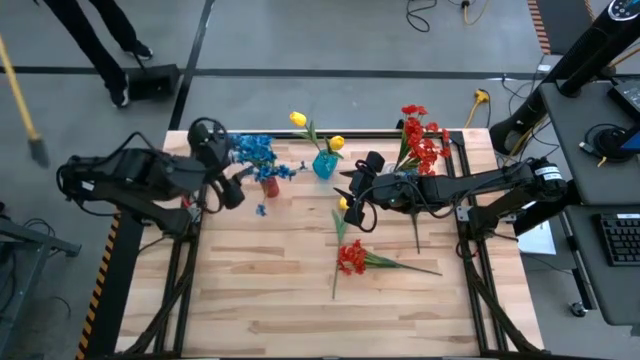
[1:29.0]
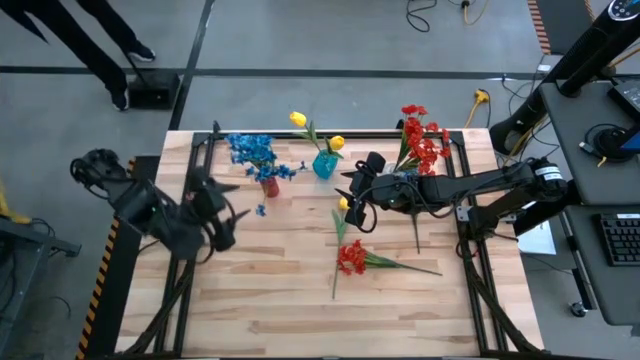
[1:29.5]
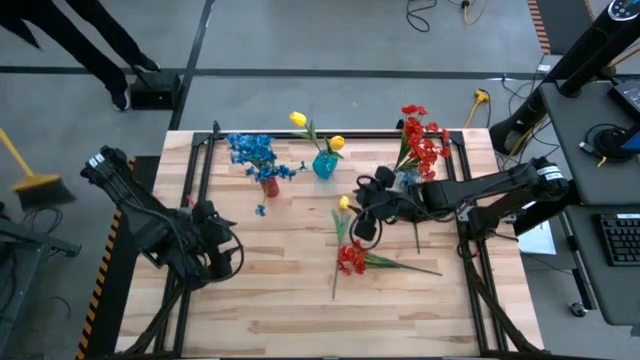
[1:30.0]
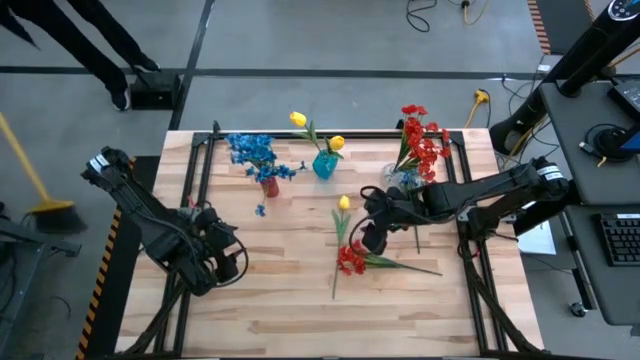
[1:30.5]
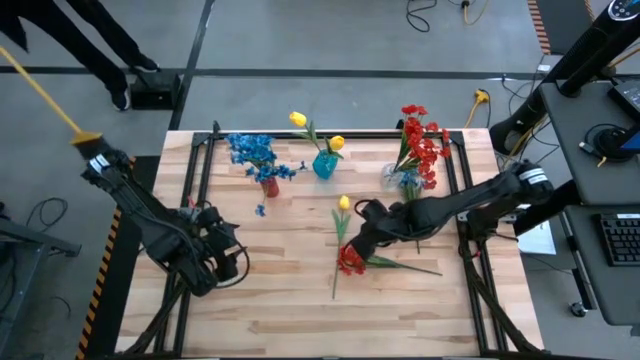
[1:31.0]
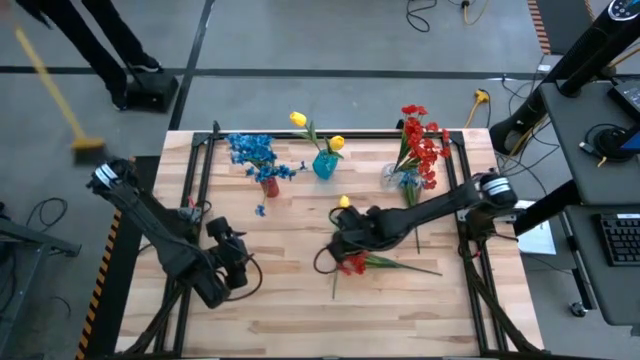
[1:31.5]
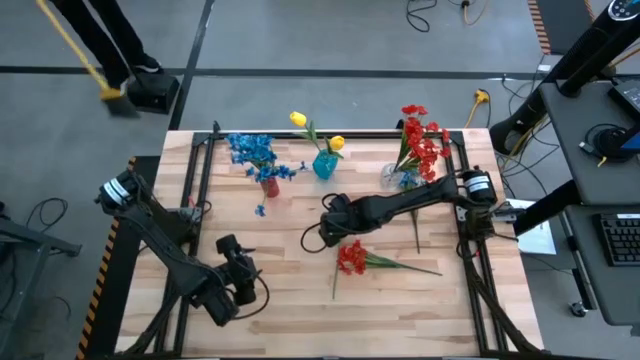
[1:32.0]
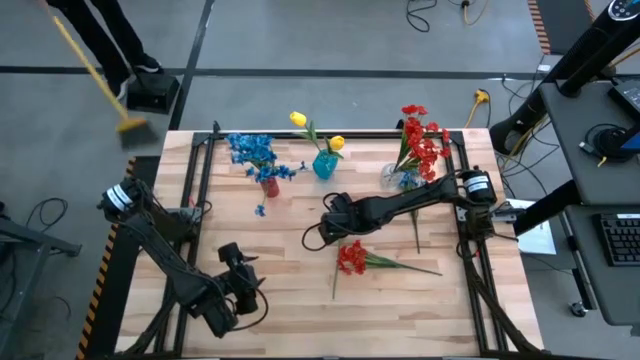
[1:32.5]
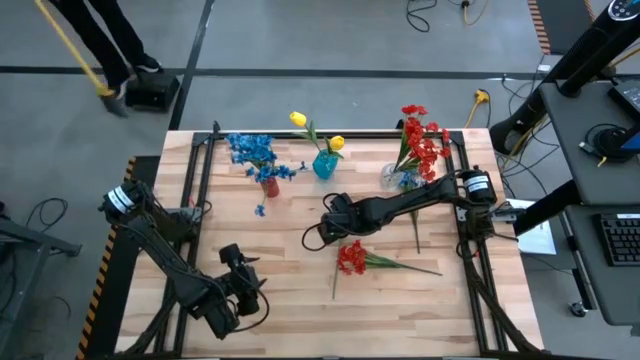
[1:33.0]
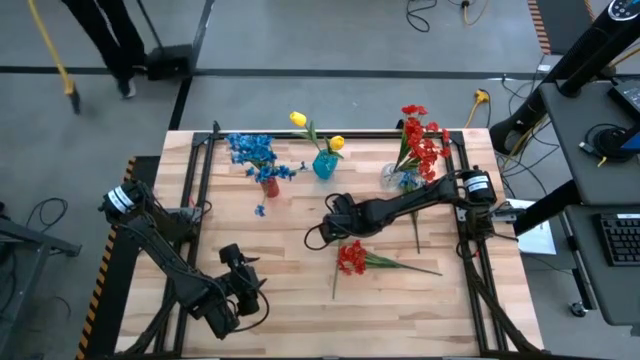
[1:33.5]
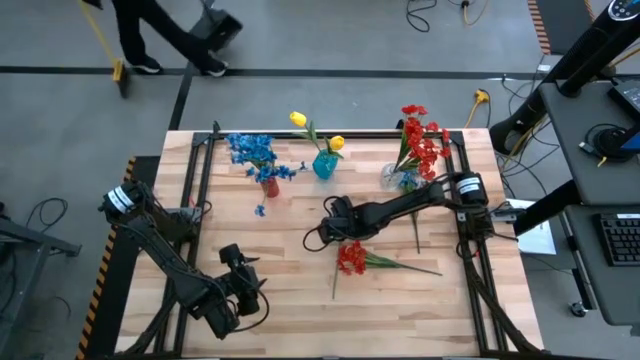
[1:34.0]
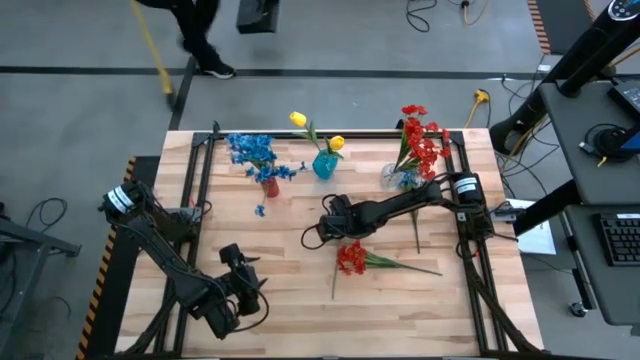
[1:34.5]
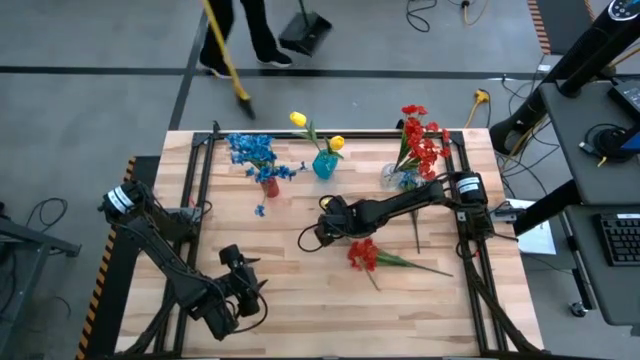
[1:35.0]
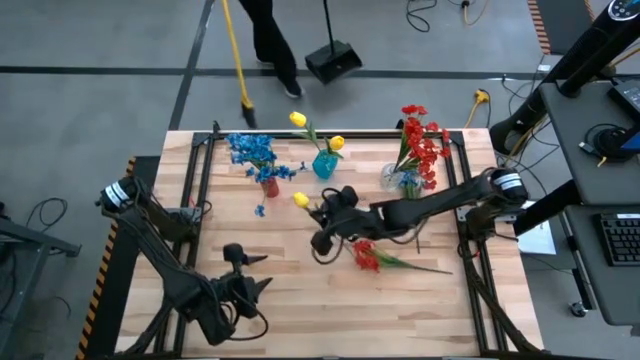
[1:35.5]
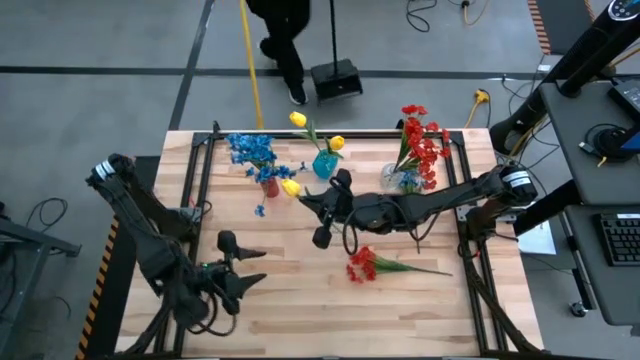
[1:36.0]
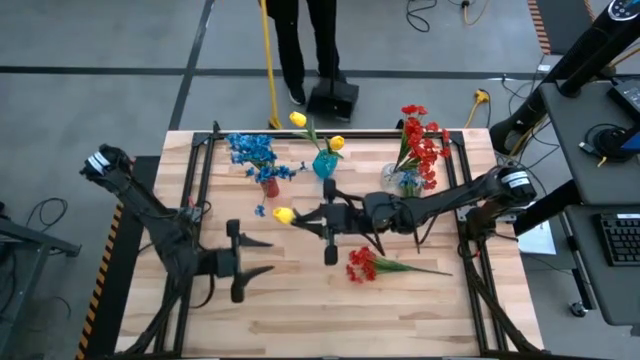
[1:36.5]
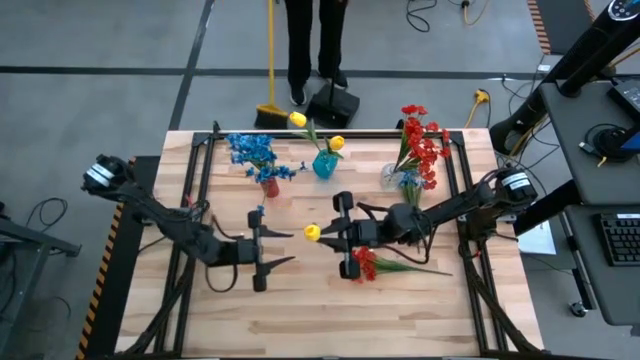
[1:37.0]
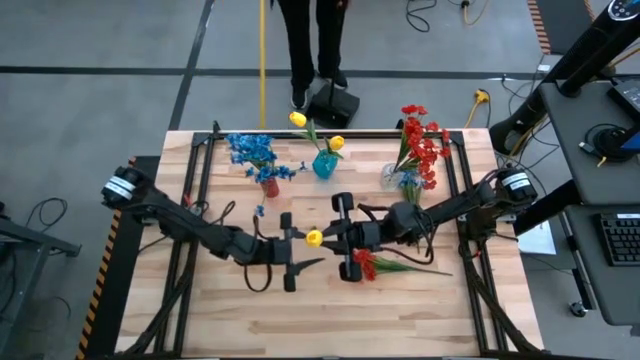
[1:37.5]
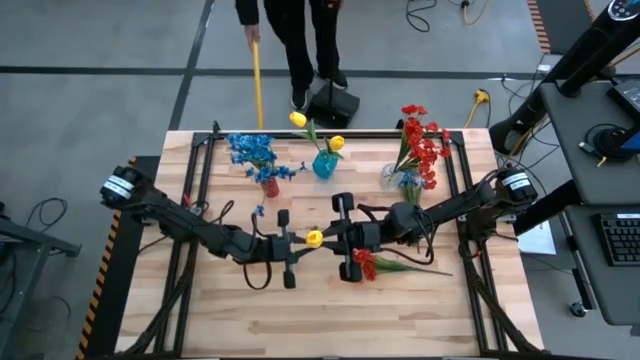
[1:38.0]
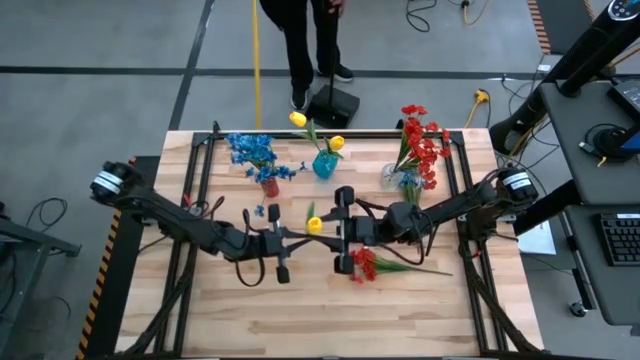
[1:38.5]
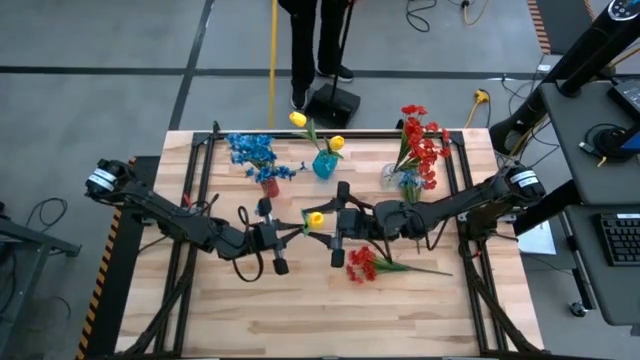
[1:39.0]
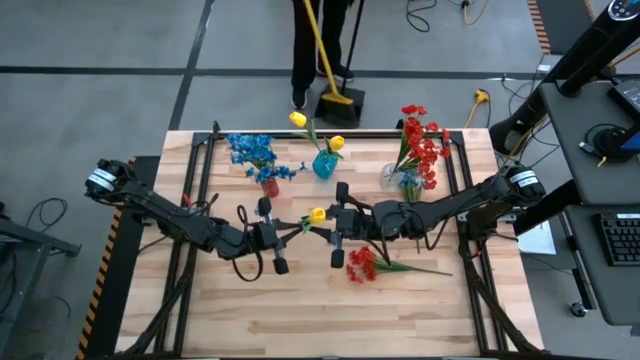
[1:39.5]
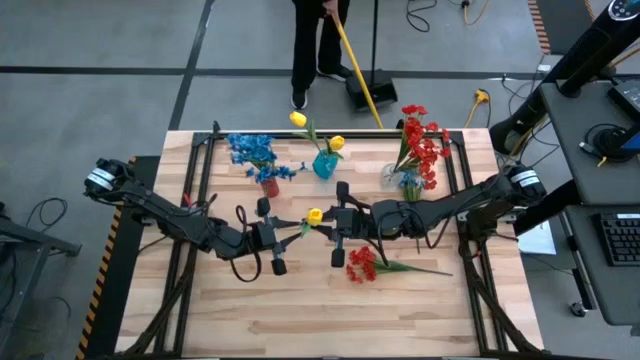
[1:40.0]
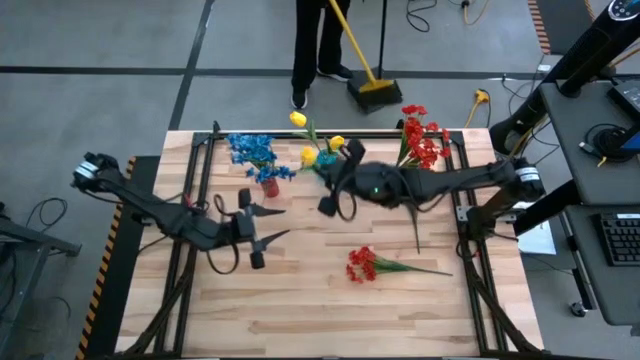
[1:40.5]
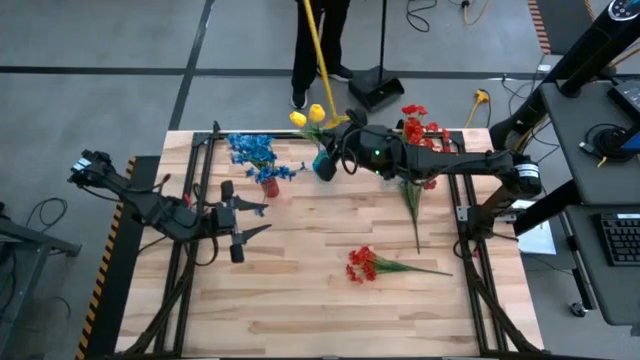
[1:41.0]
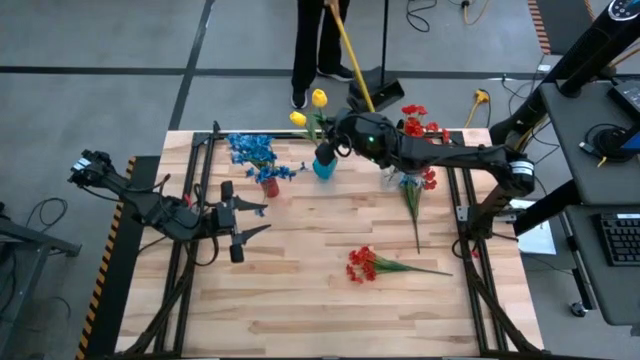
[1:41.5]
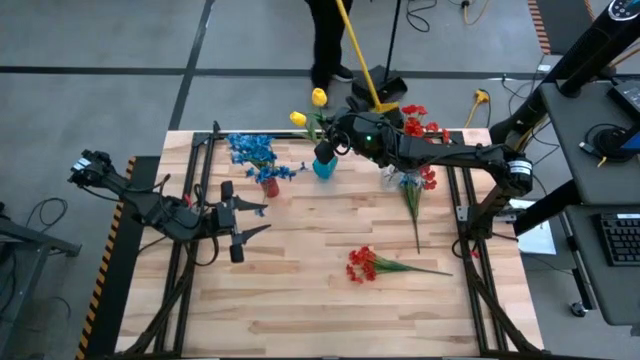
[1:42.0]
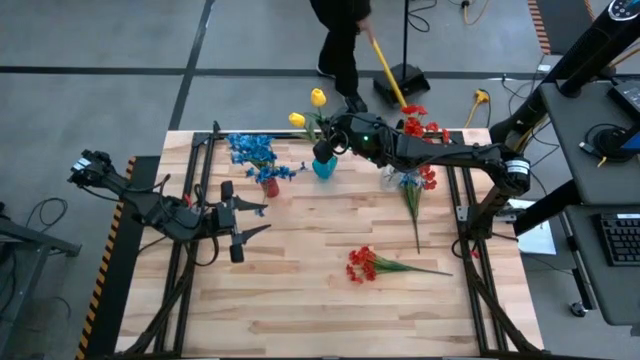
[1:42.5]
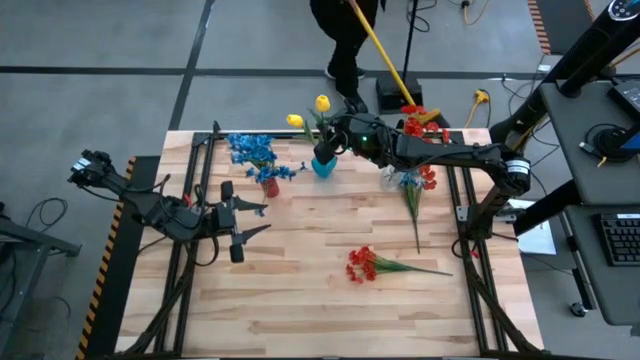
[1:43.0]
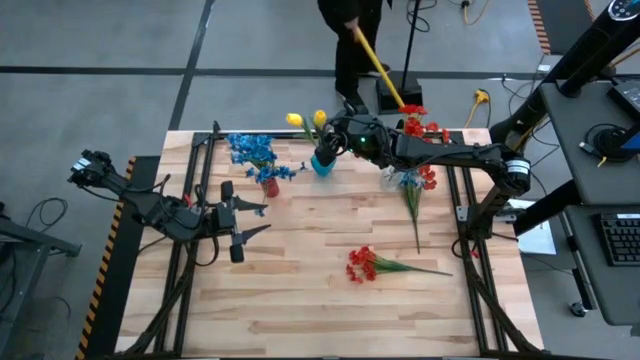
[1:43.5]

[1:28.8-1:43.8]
Task: Sort flowers into vase by color
Put the yellow flower into the blue vase
